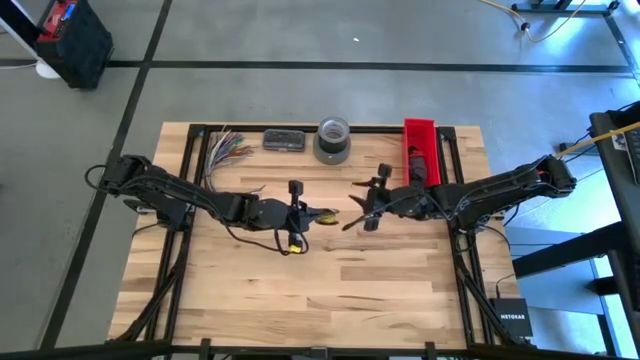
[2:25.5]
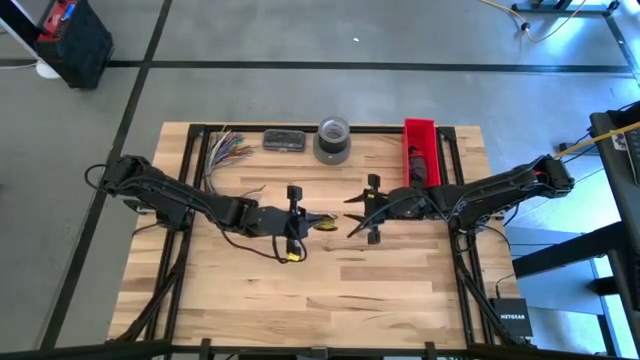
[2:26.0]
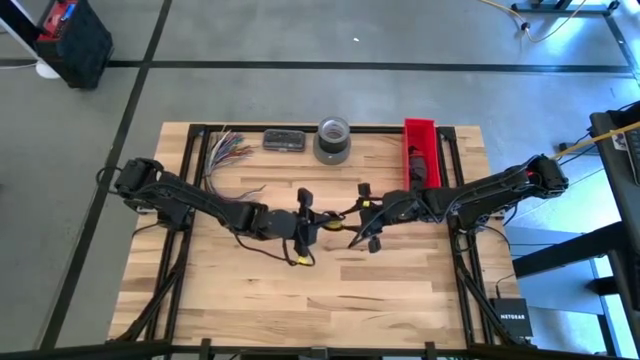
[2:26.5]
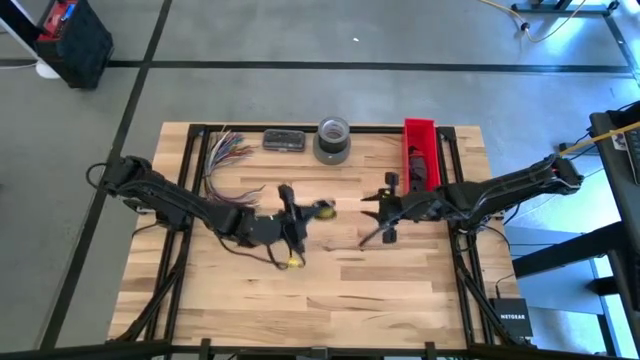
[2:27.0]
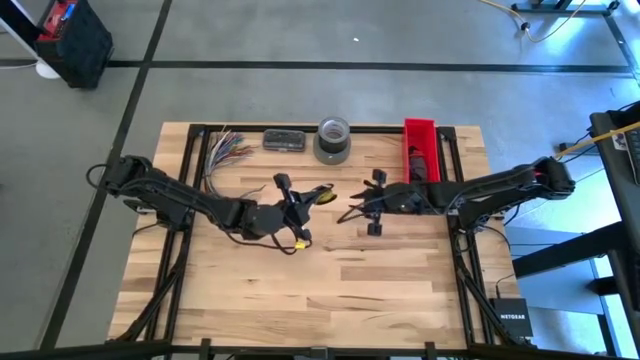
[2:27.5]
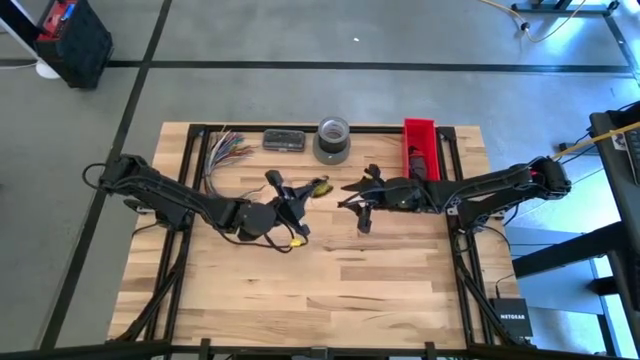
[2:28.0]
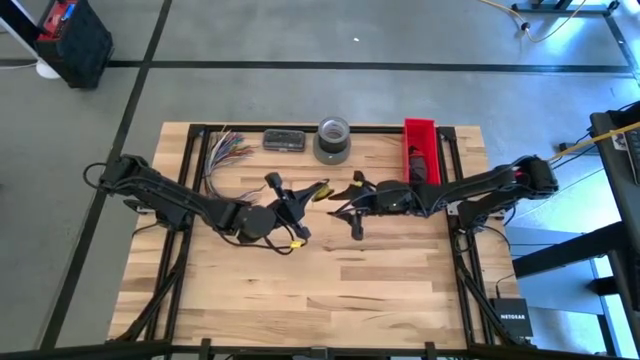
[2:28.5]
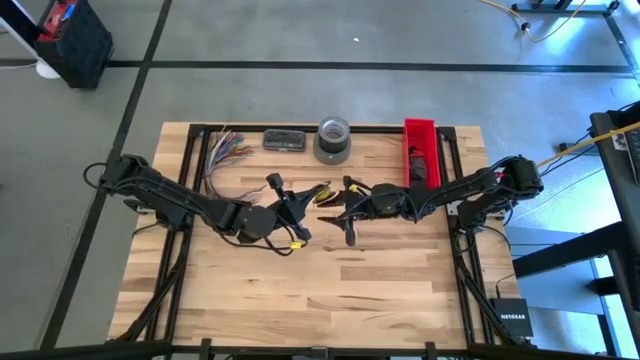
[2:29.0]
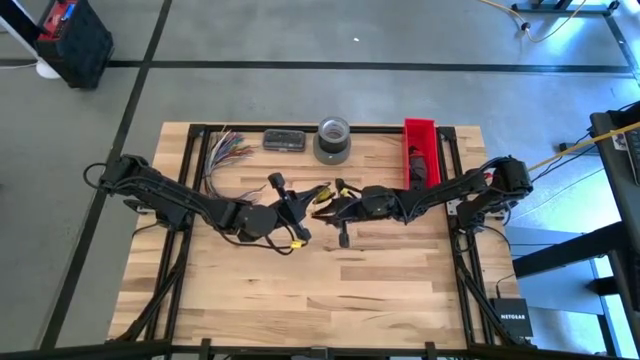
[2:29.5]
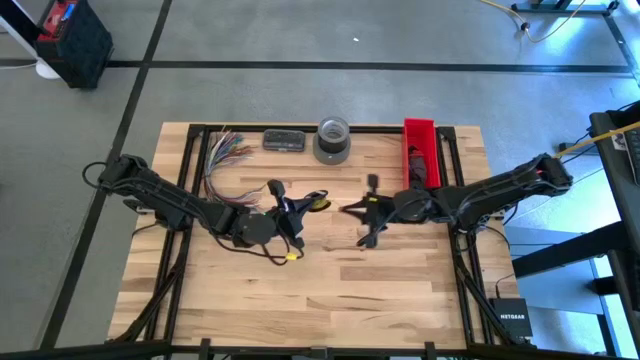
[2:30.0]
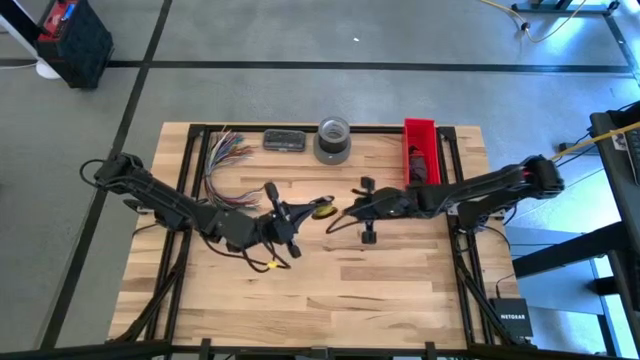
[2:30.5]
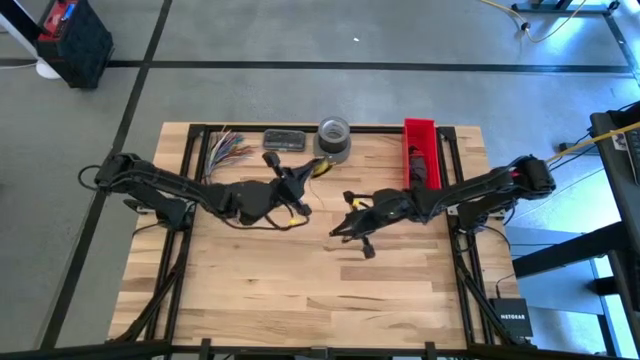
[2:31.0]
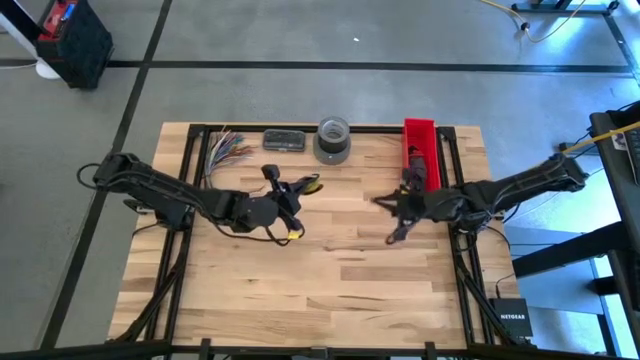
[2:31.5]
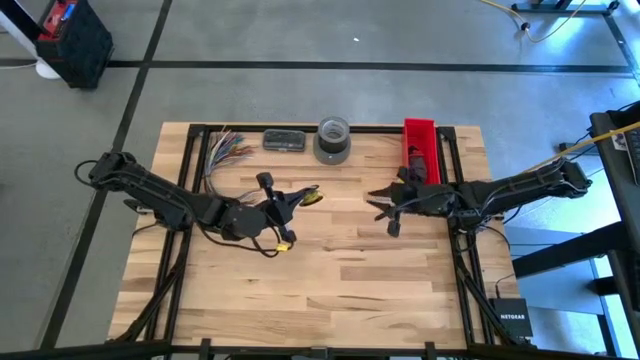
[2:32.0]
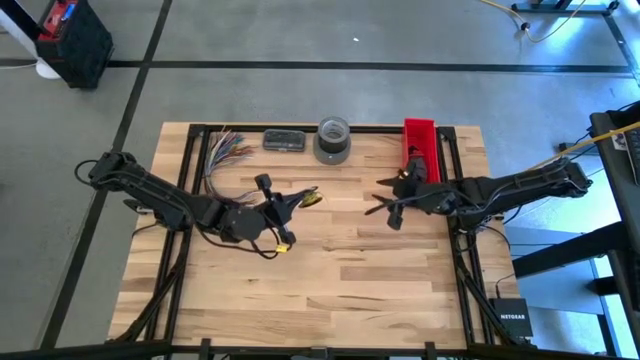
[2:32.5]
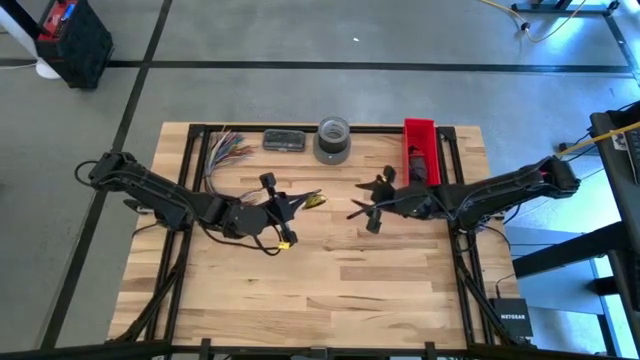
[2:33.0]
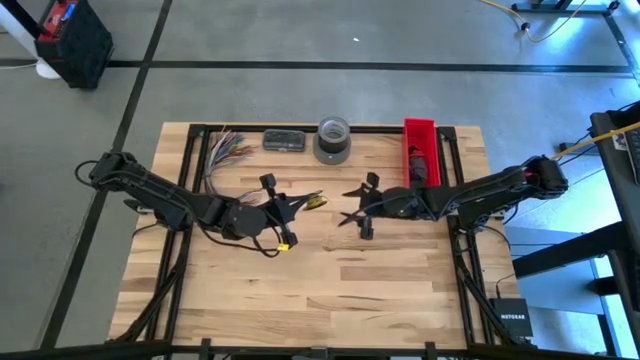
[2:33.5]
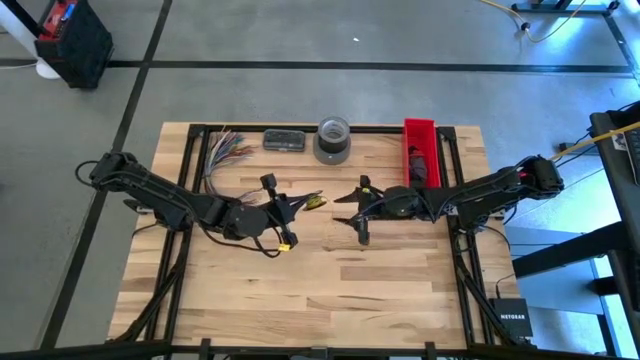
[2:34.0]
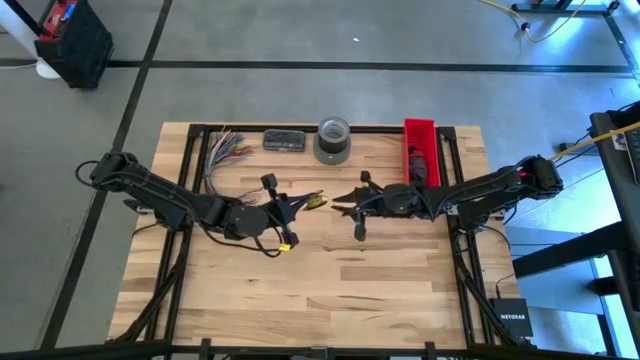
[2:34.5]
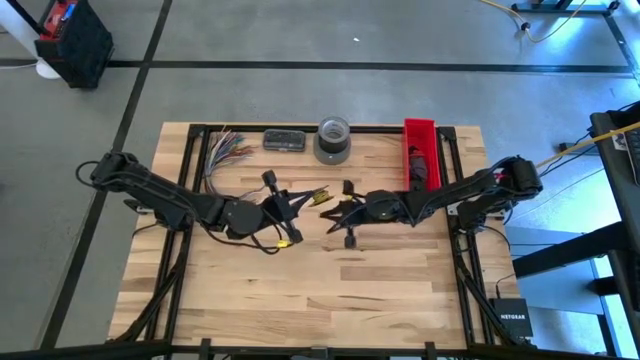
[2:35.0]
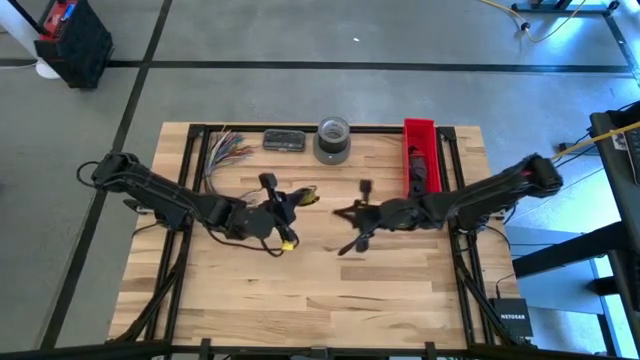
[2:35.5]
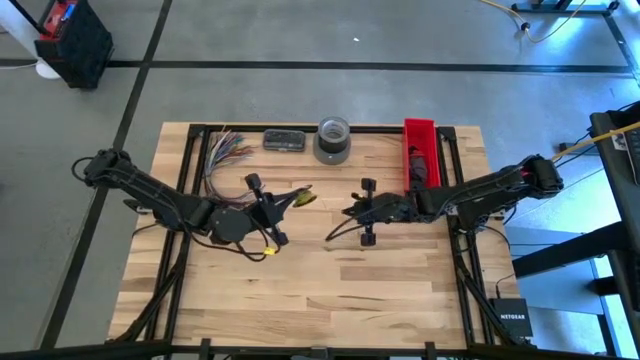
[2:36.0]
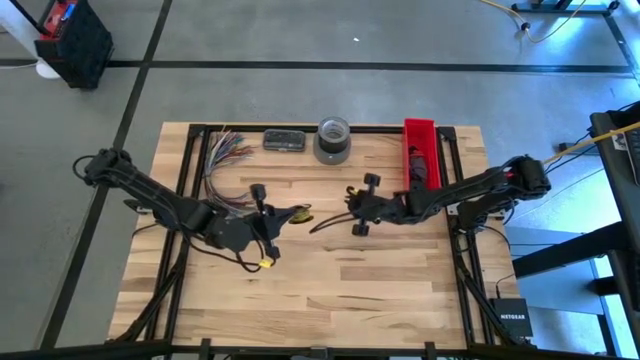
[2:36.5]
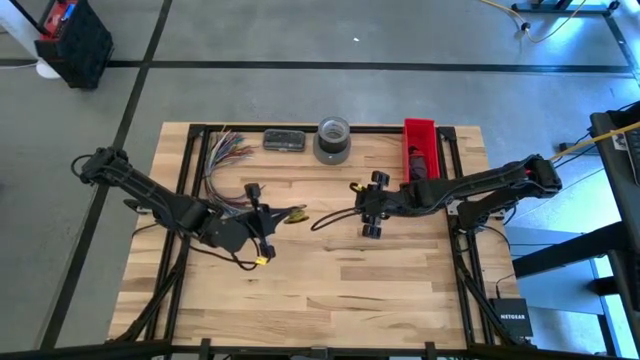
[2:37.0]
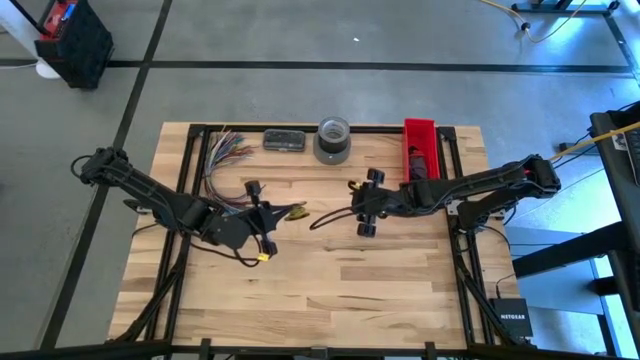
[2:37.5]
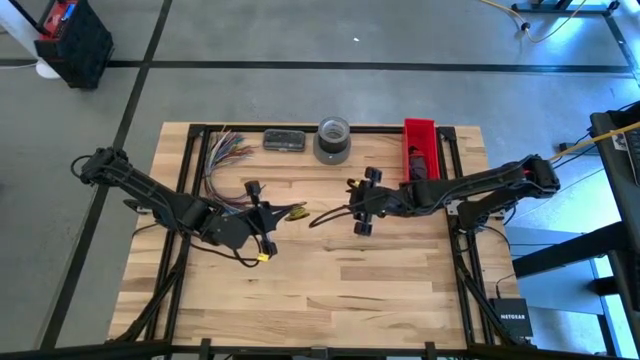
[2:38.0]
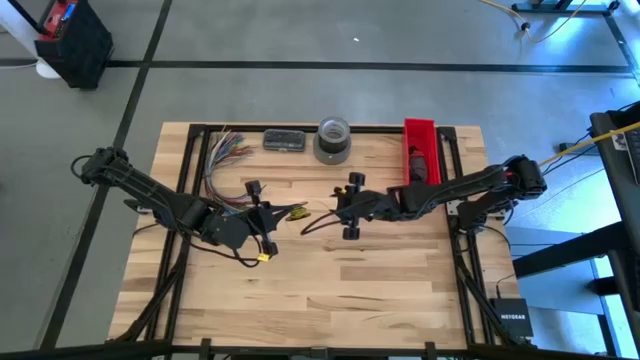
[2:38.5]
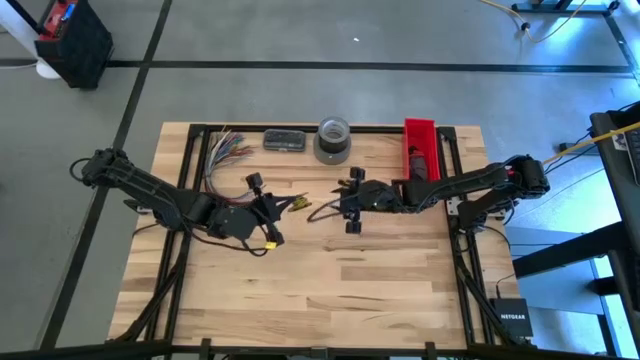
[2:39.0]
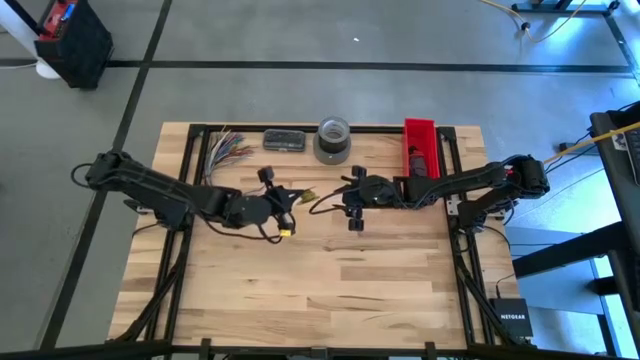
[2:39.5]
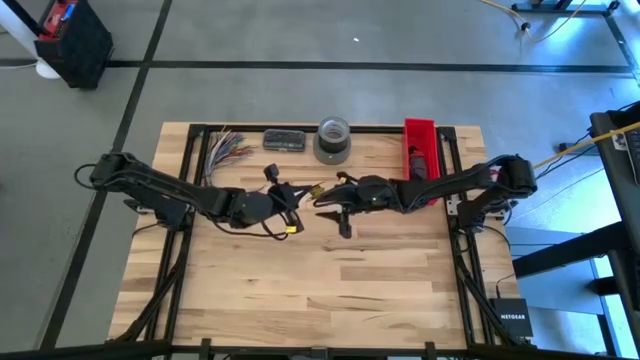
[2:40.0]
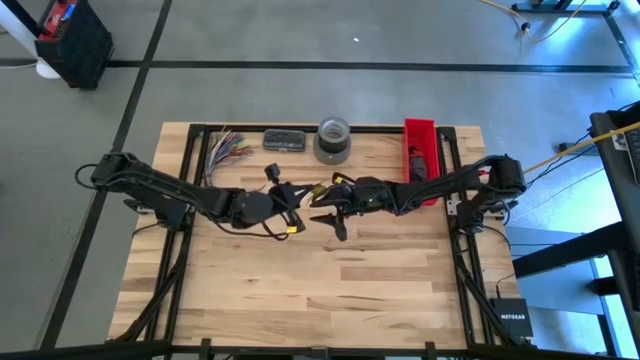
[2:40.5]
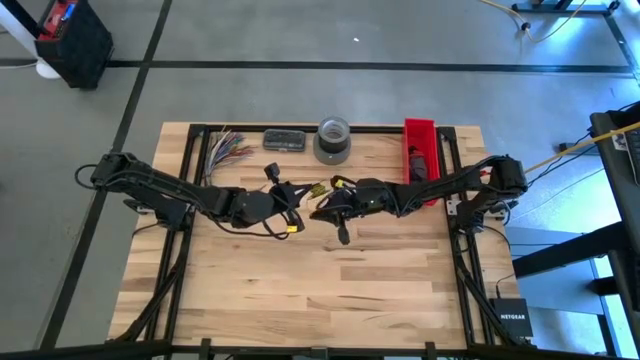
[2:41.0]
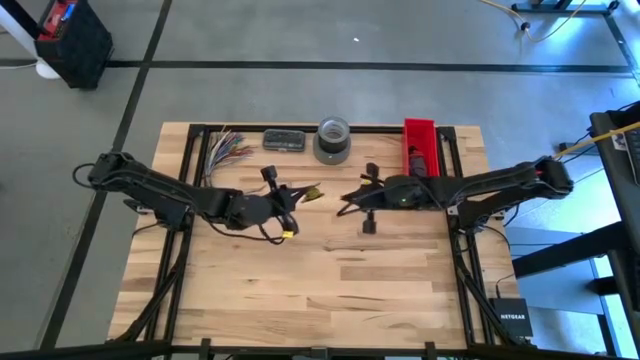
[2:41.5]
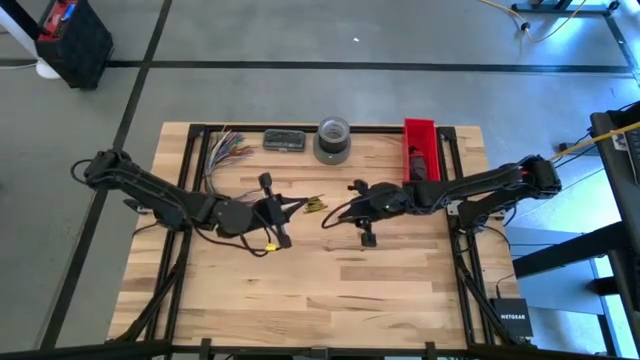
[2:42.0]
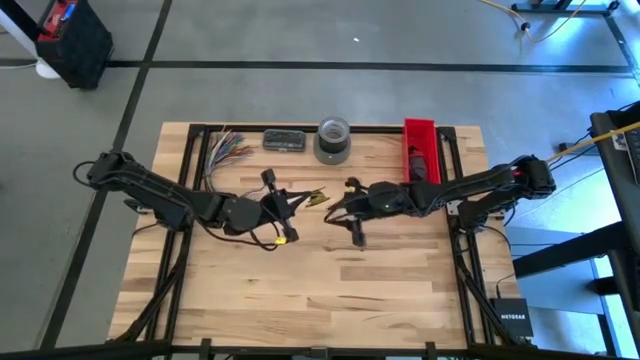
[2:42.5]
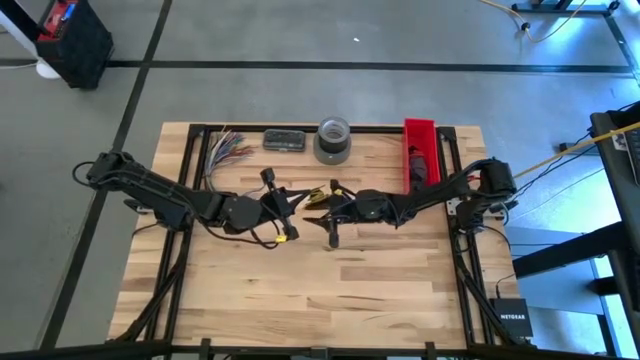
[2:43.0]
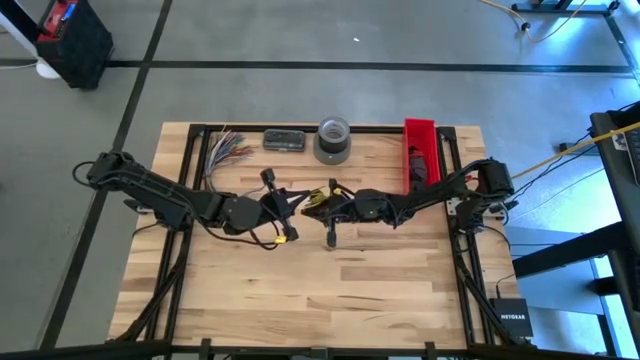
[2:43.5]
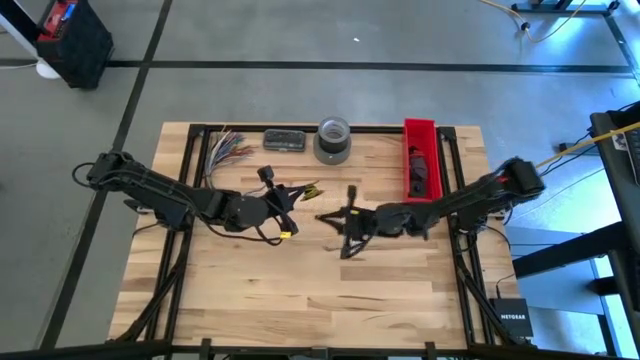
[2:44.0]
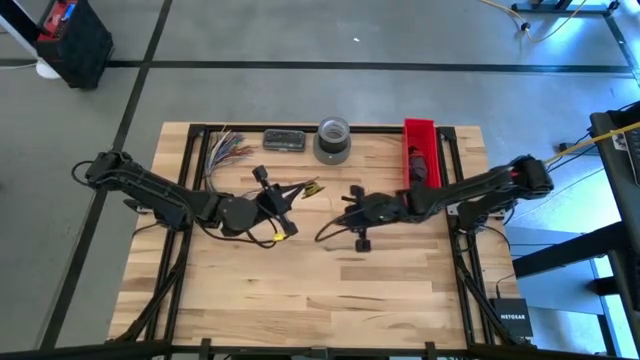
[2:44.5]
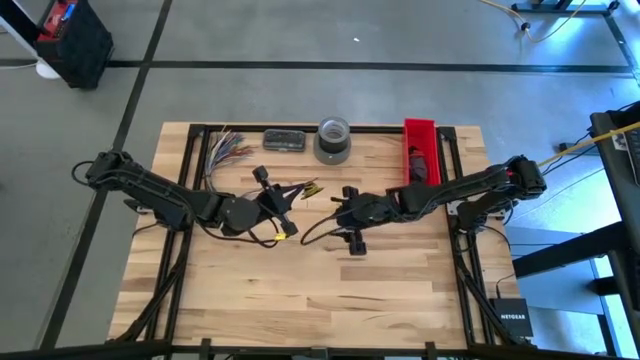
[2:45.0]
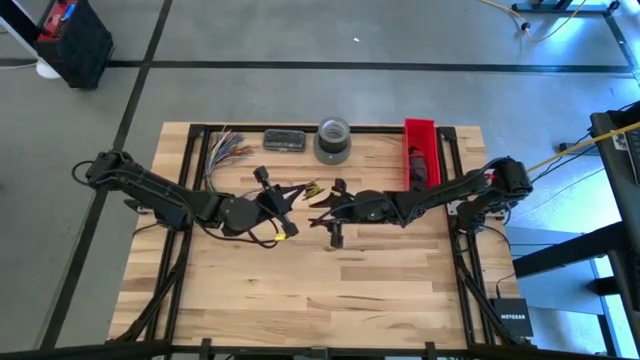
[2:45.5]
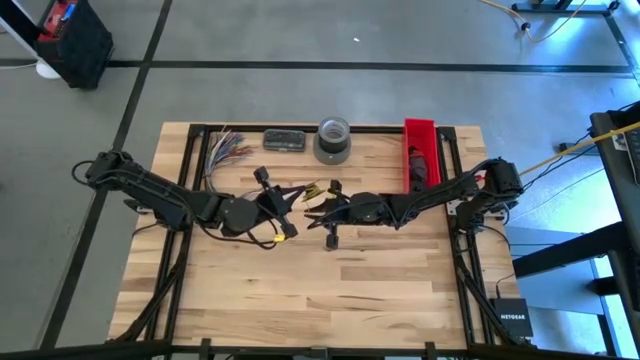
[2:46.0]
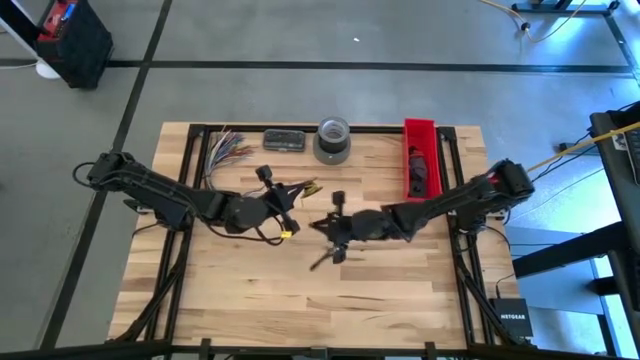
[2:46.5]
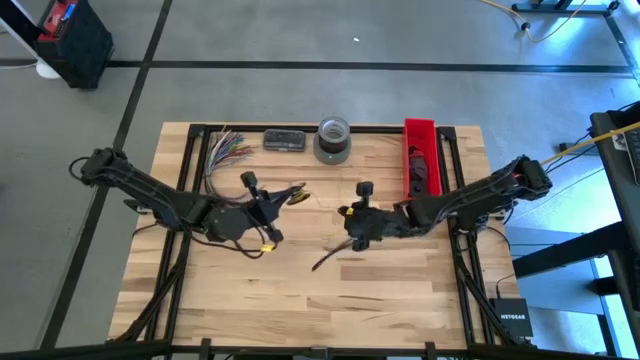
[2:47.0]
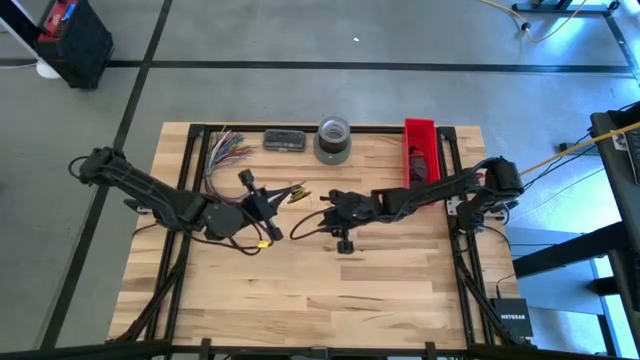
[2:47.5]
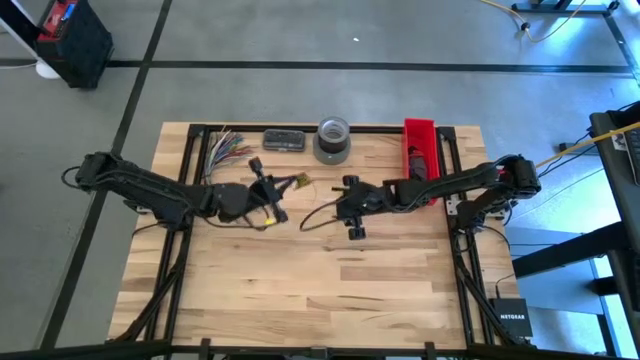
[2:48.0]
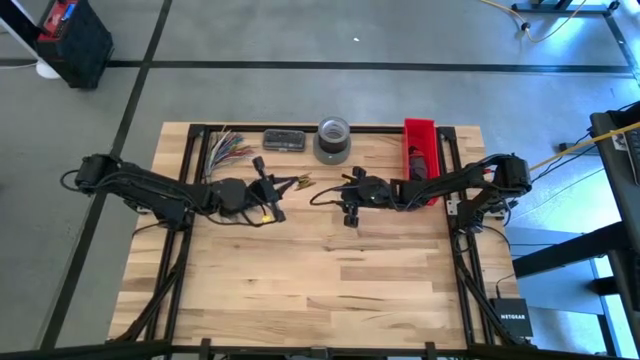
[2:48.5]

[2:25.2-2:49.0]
Task: Coil cords
Uncoil the yellow wire from the black spool
